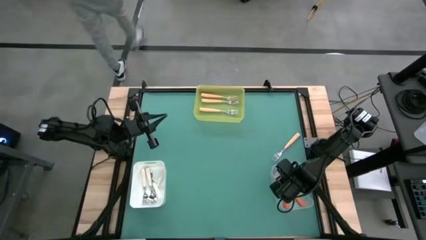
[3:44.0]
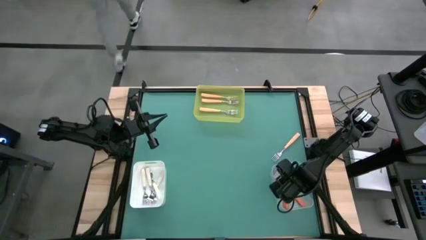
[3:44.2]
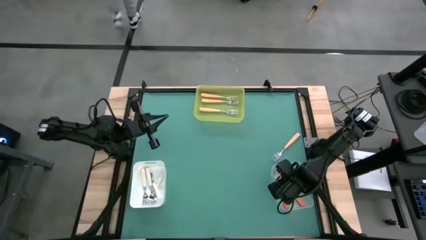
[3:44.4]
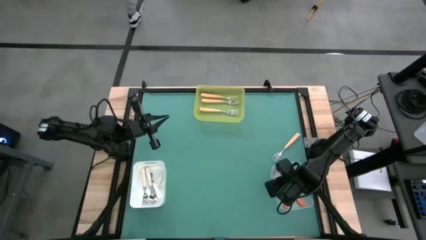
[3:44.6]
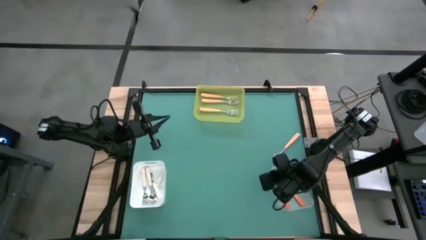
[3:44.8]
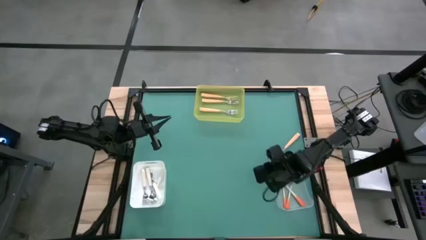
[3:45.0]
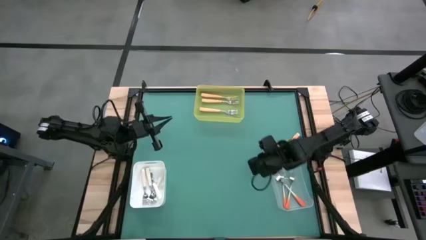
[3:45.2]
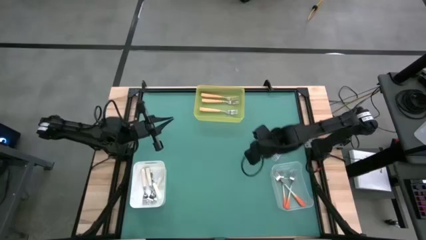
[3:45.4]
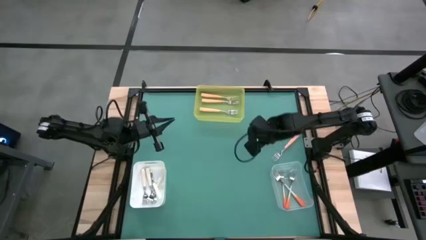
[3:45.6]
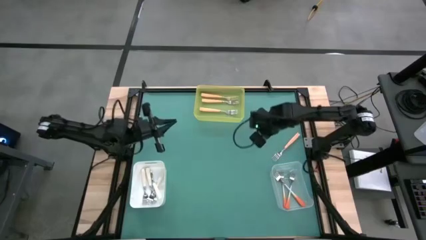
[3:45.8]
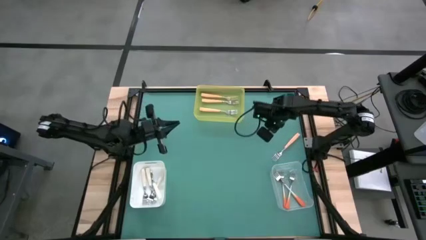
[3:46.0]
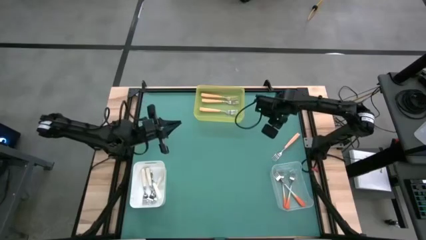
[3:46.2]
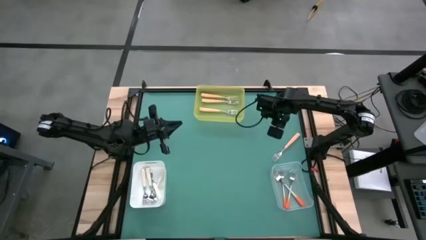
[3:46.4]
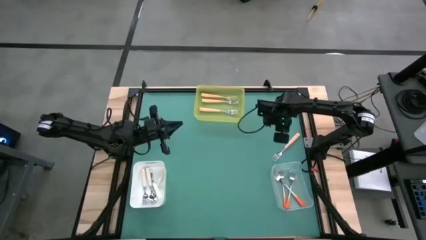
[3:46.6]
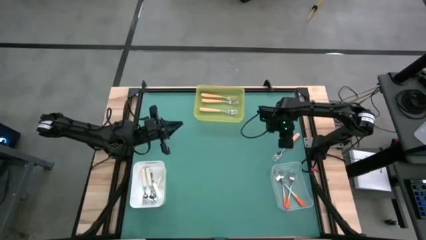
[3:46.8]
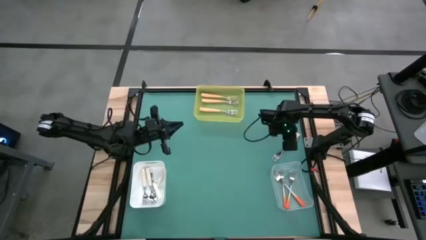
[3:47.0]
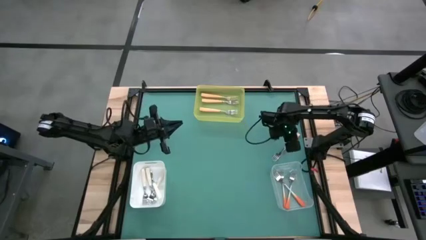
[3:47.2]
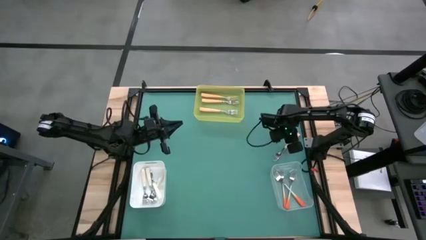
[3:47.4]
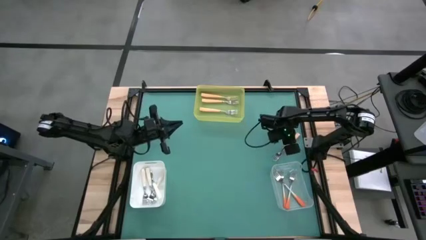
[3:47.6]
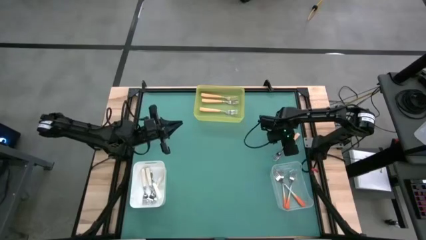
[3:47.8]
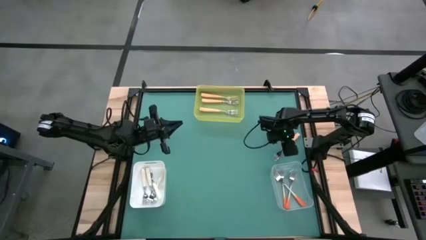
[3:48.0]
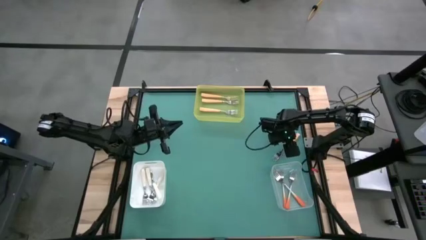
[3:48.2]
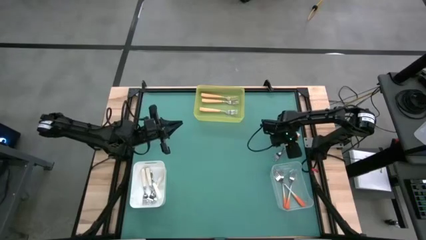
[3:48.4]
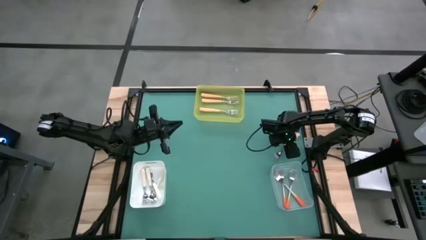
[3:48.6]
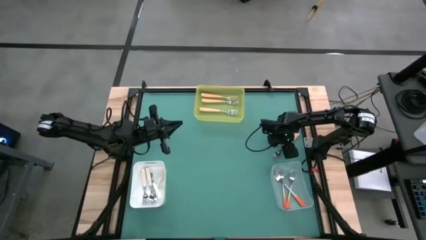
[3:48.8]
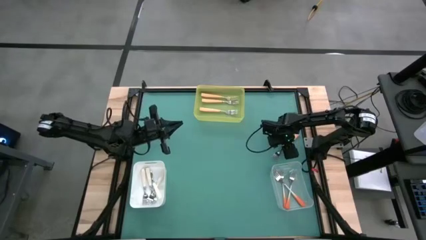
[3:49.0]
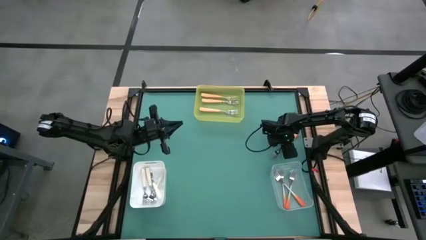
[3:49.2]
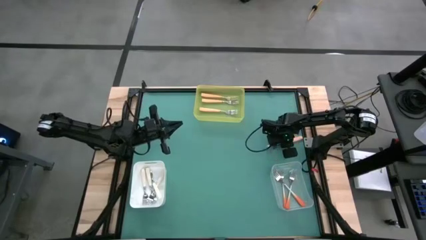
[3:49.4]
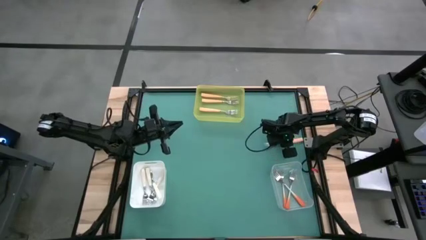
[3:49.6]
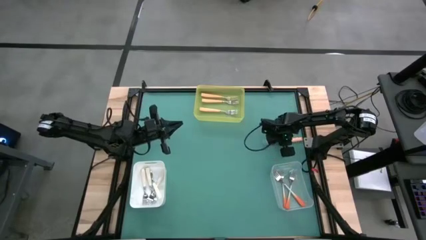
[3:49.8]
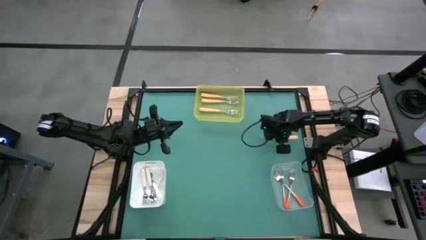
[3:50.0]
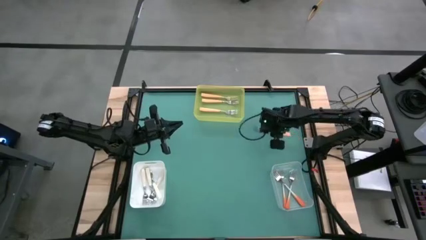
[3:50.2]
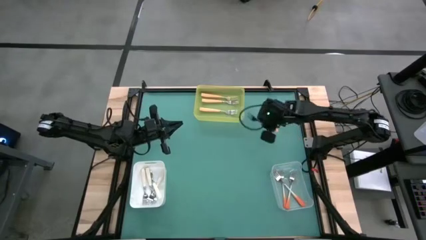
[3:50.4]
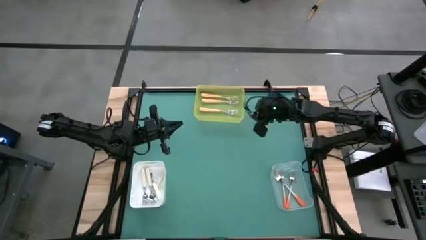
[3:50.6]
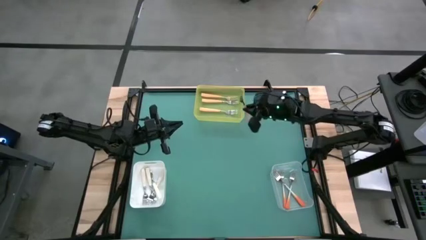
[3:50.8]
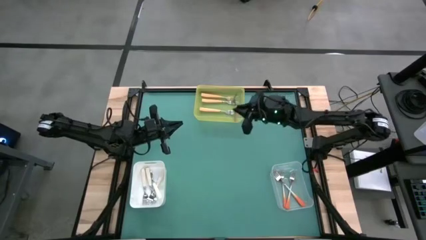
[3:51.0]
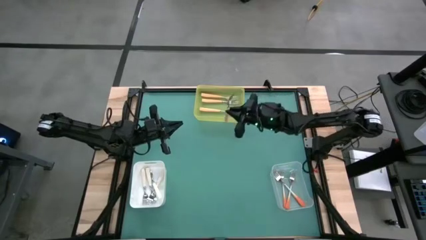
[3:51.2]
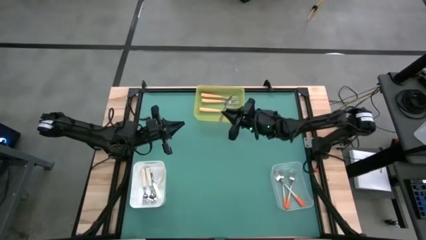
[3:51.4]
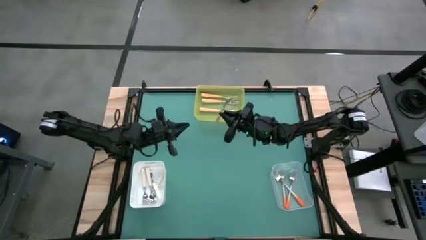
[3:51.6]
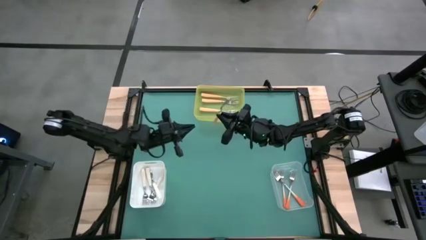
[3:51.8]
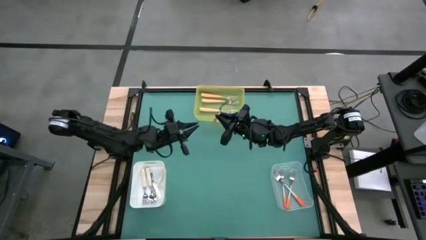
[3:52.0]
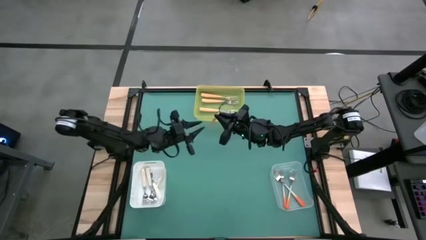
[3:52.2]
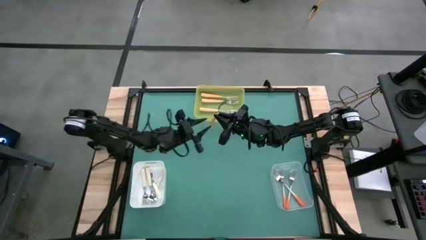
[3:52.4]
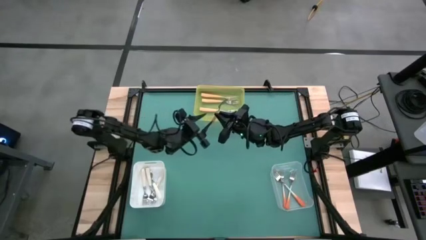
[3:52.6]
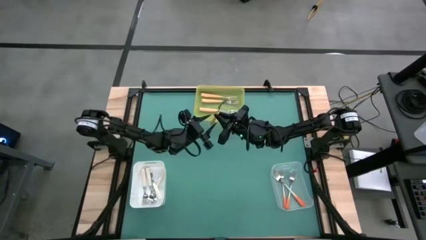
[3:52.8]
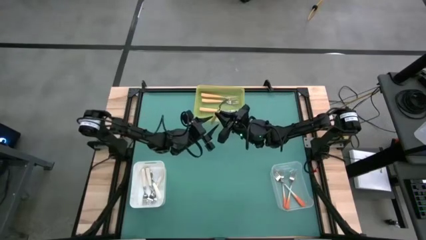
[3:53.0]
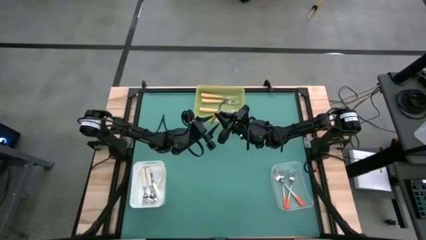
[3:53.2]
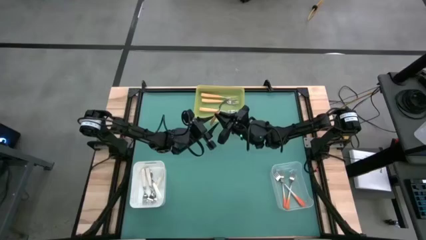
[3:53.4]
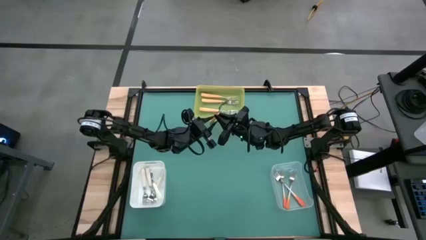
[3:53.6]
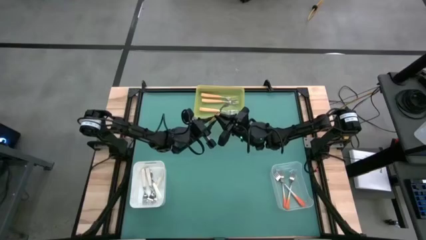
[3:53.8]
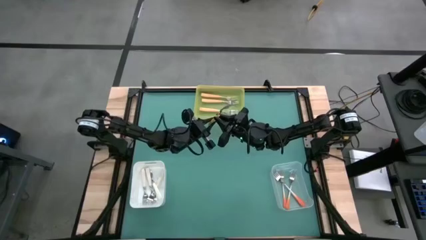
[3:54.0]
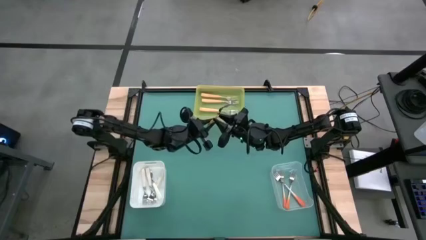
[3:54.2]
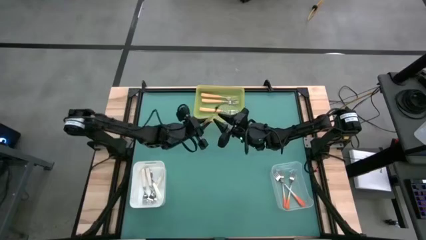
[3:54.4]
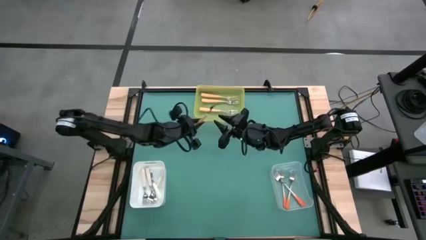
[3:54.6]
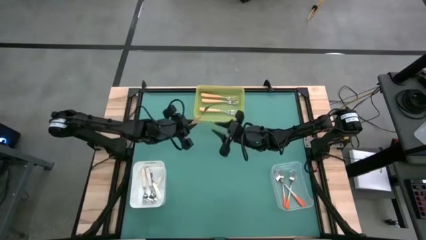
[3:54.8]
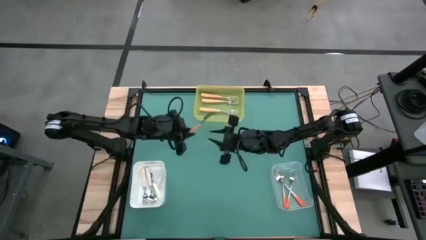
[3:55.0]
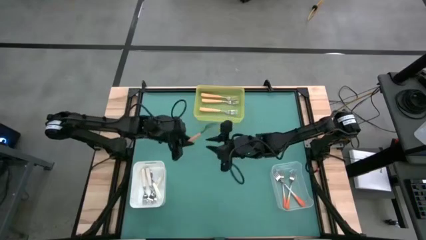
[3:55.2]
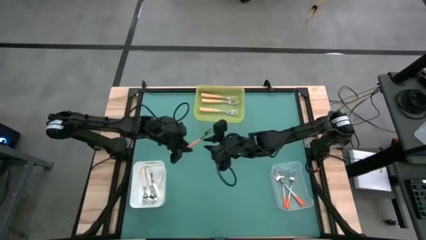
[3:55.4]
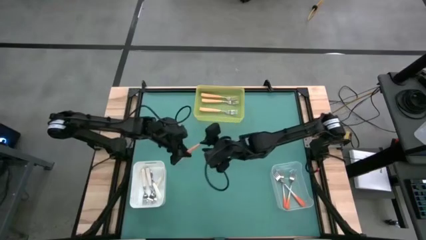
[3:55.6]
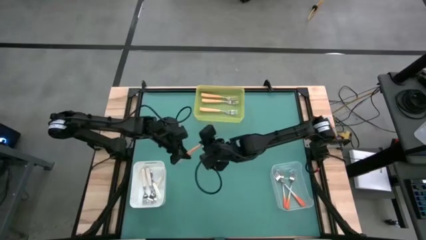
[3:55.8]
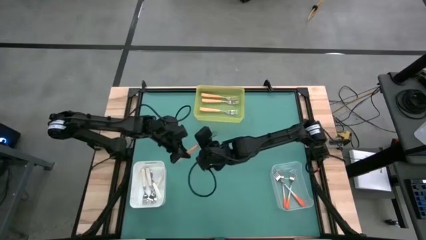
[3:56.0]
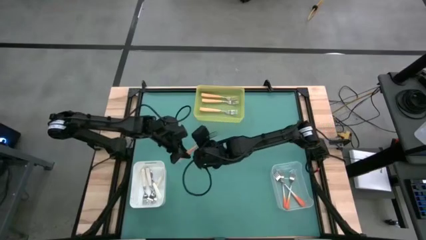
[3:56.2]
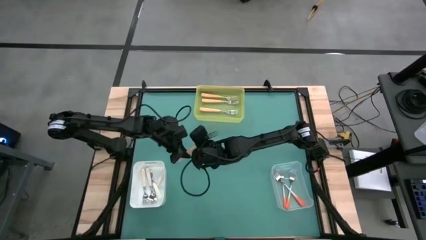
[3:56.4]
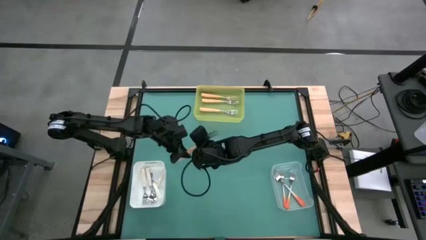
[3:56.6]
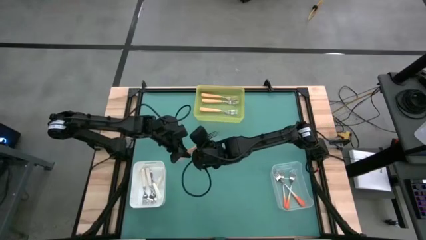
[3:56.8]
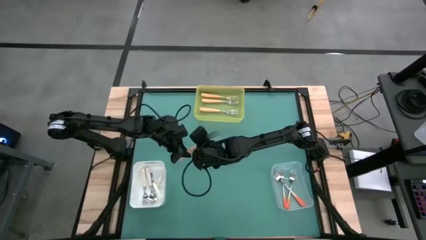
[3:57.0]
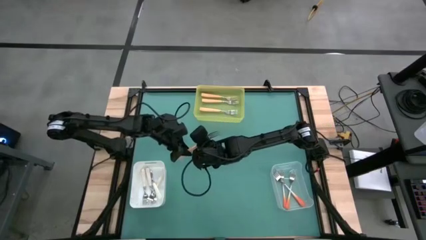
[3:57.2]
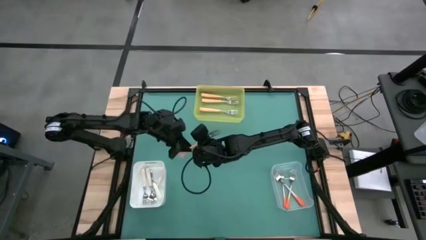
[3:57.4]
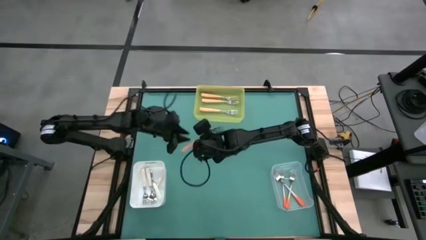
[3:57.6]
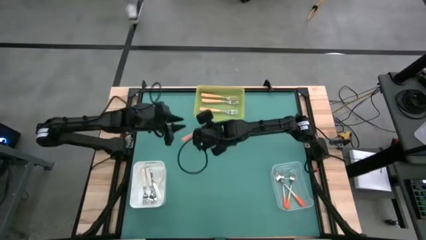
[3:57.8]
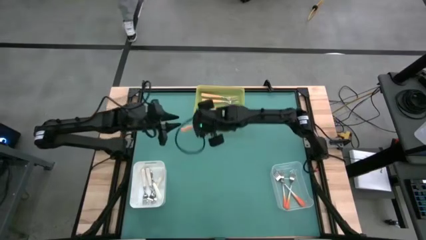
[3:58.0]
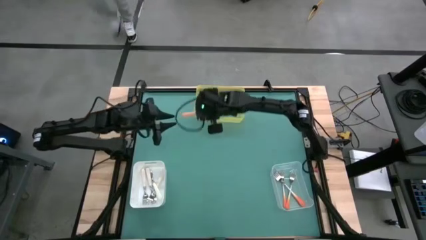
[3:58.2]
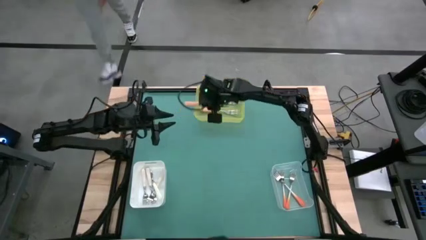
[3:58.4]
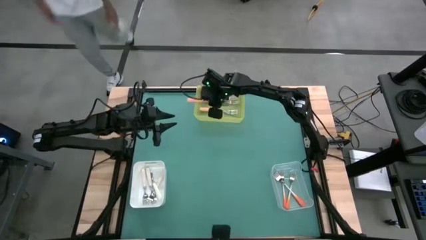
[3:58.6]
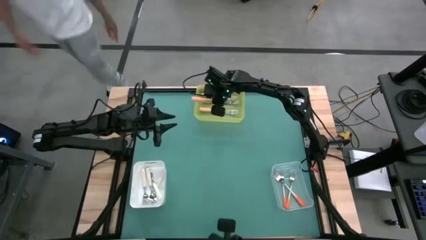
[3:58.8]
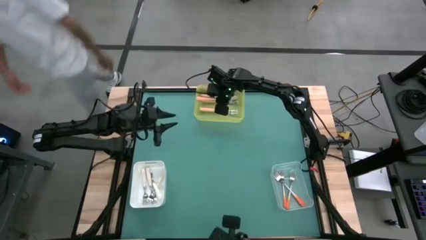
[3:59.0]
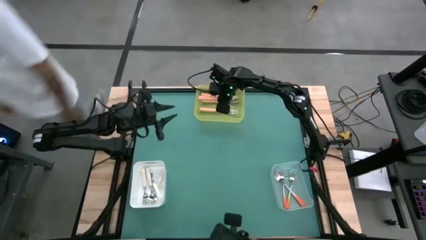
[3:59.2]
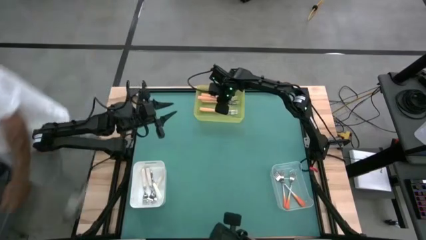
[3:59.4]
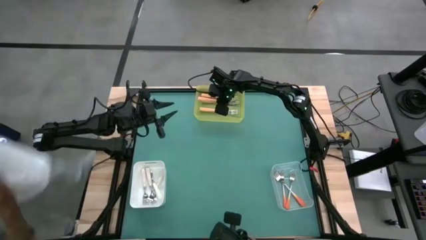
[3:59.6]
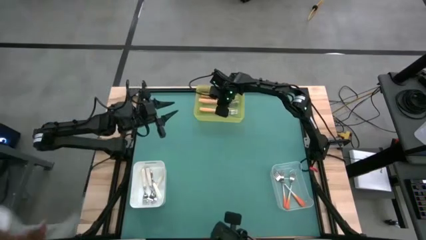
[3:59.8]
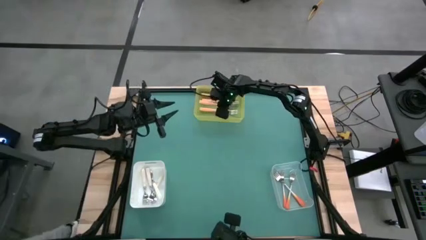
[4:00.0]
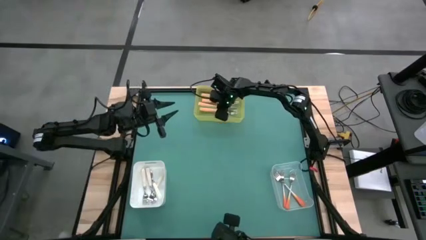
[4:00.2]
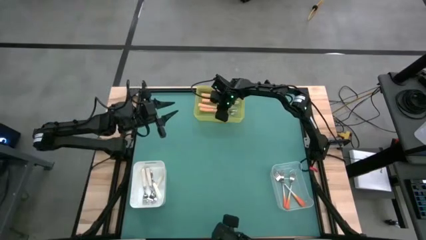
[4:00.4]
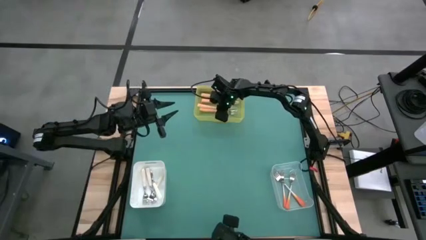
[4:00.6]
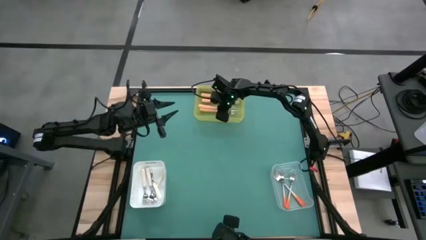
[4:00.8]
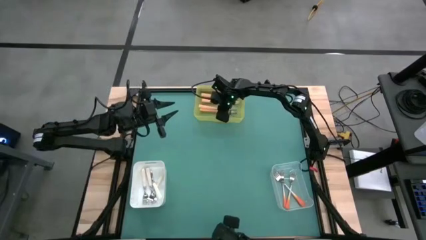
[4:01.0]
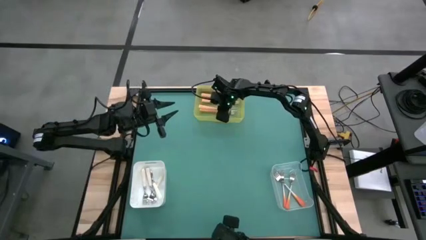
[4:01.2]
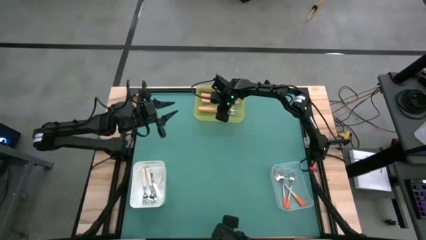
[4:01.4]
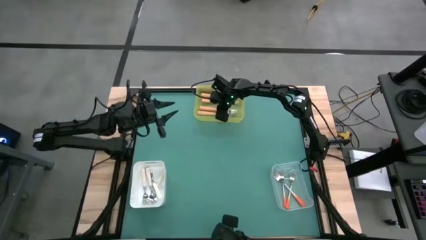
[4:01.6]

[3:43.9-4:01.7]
Task: Sort silverware by color (type)
Put the yellow fork into the yellow bin
